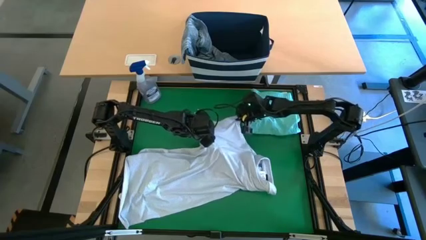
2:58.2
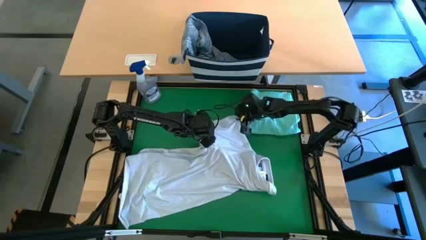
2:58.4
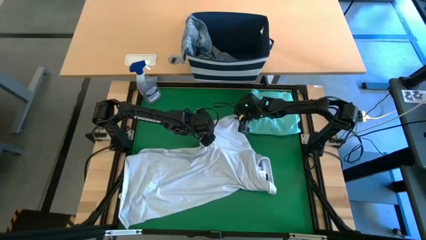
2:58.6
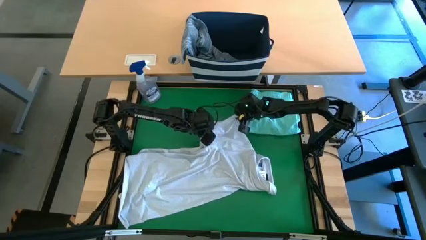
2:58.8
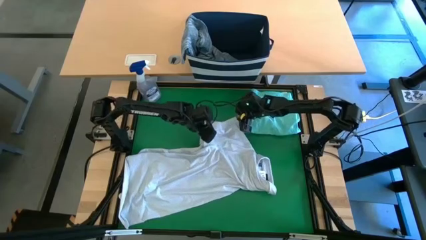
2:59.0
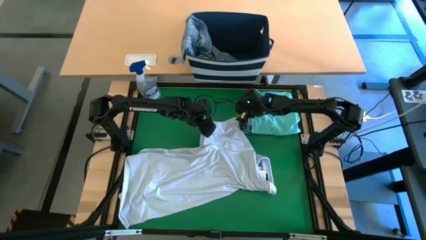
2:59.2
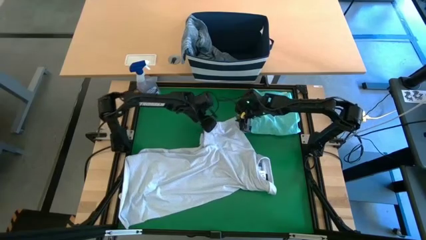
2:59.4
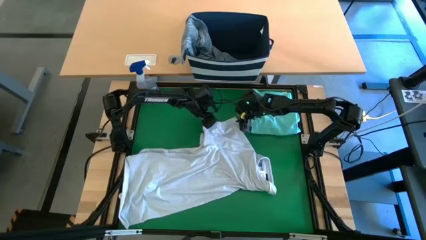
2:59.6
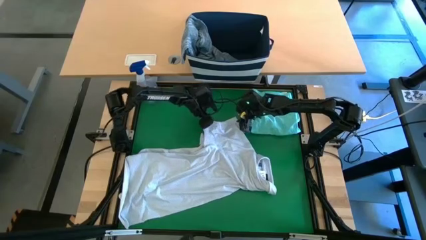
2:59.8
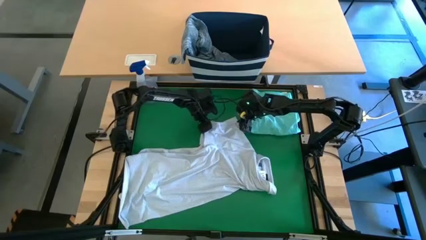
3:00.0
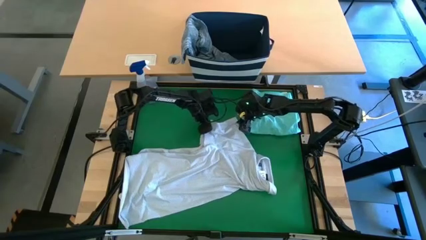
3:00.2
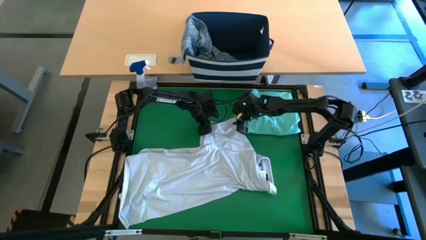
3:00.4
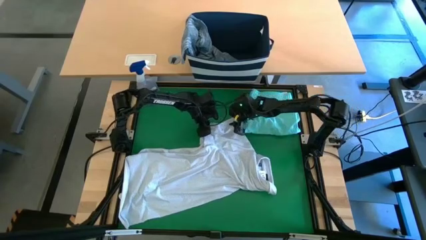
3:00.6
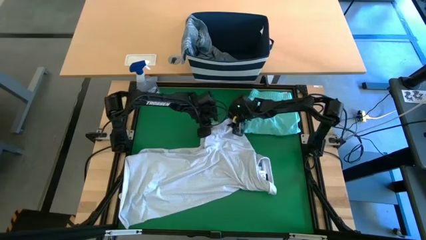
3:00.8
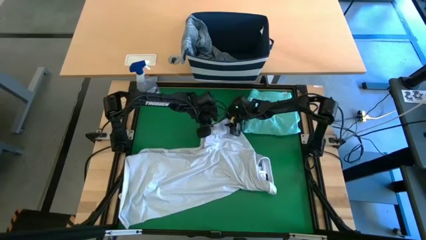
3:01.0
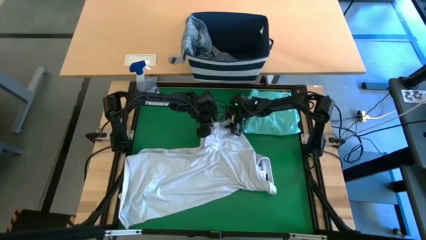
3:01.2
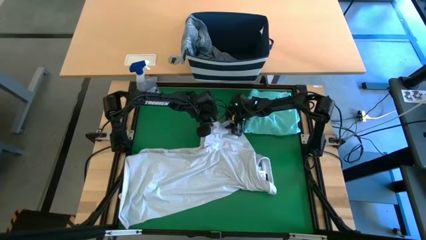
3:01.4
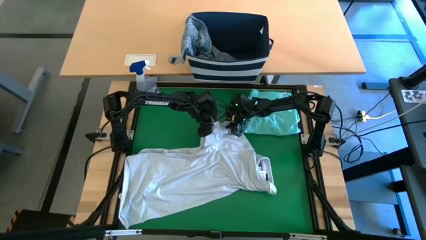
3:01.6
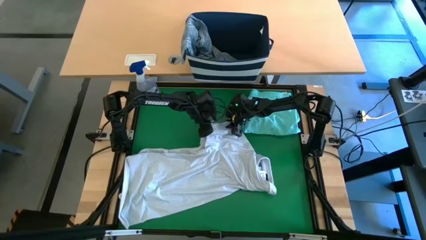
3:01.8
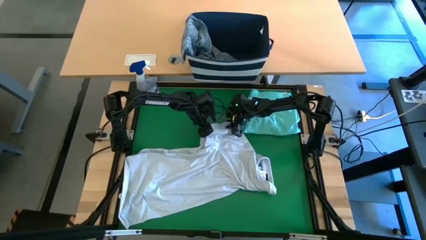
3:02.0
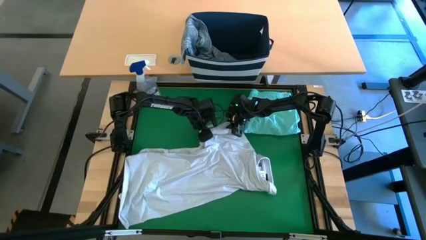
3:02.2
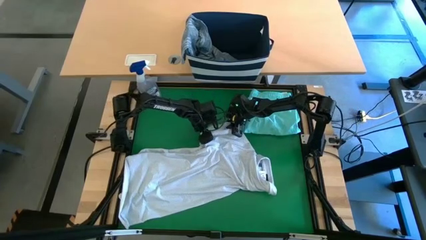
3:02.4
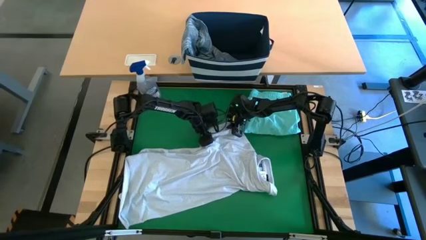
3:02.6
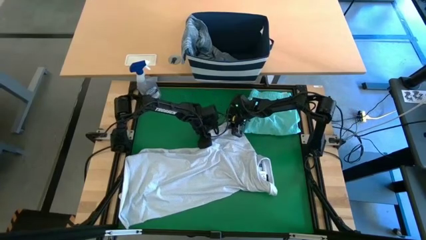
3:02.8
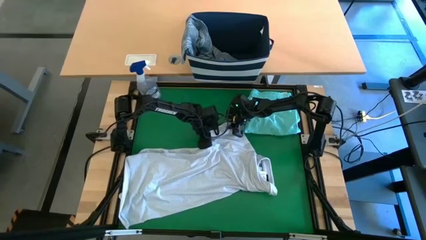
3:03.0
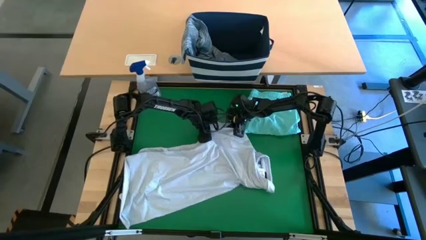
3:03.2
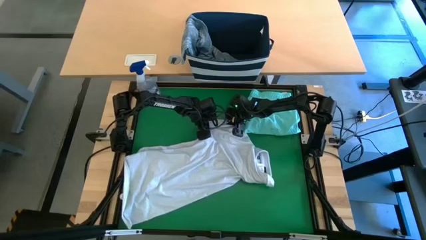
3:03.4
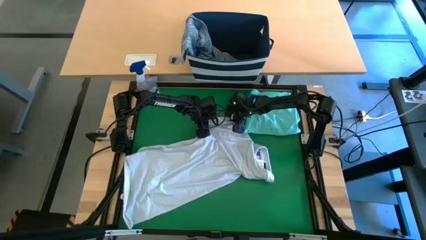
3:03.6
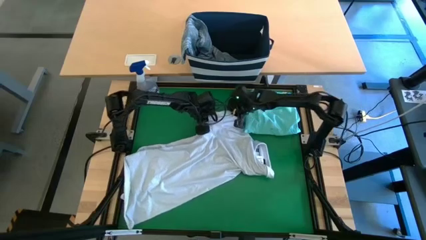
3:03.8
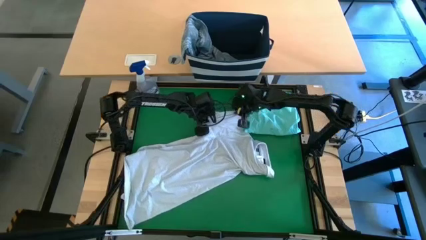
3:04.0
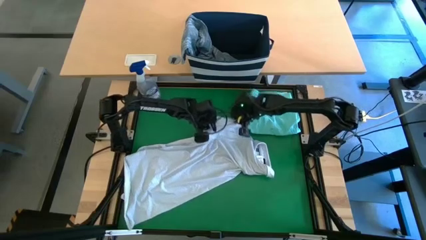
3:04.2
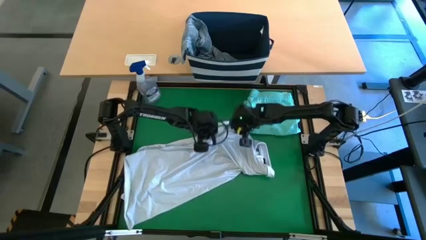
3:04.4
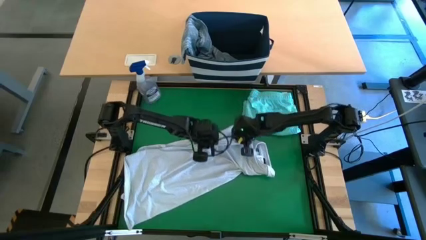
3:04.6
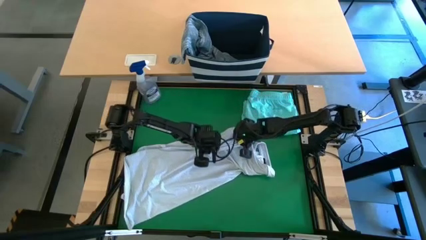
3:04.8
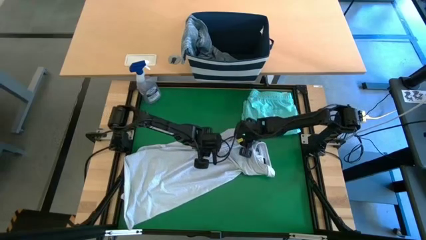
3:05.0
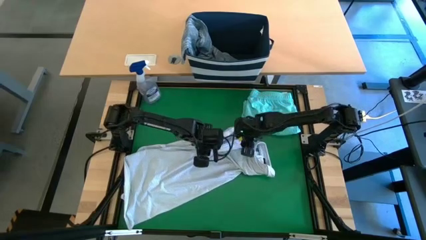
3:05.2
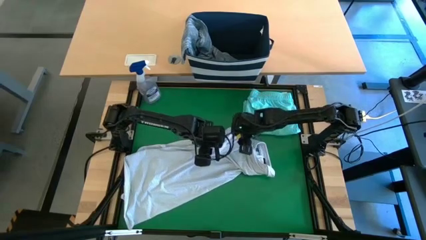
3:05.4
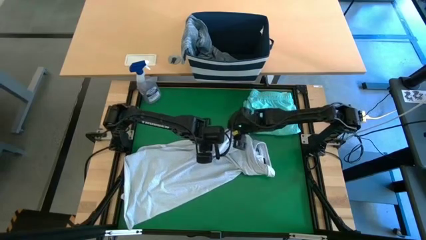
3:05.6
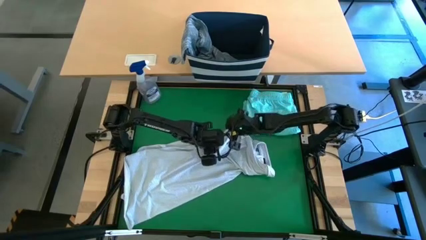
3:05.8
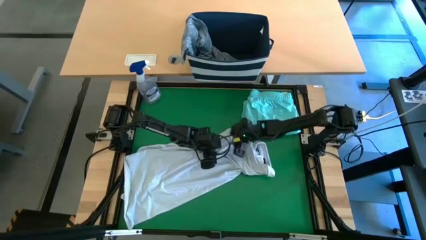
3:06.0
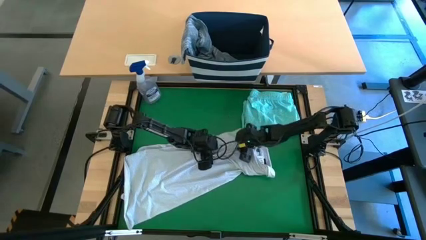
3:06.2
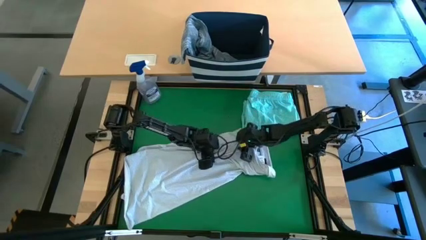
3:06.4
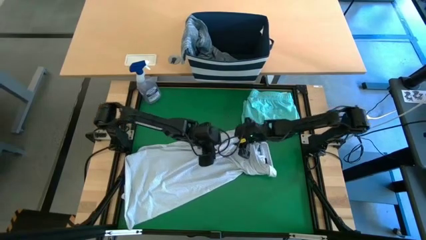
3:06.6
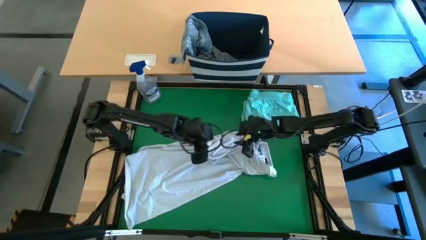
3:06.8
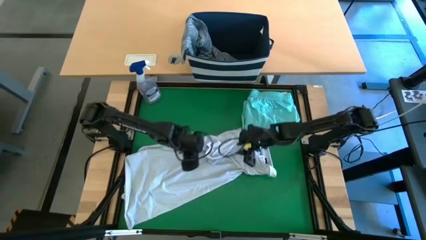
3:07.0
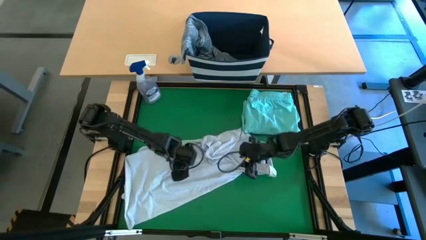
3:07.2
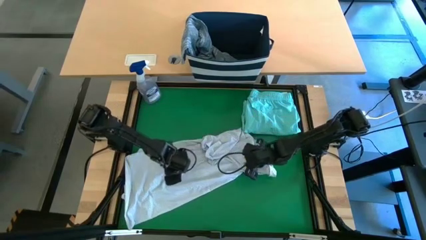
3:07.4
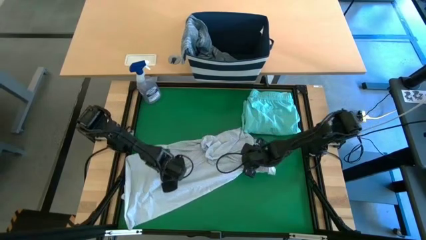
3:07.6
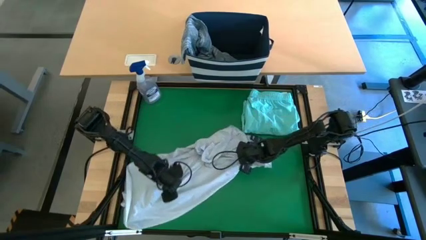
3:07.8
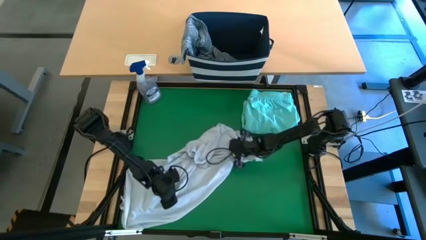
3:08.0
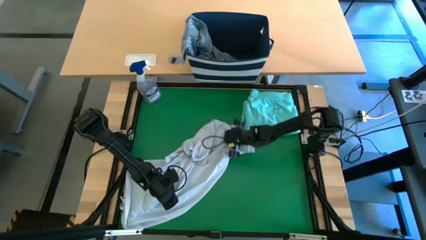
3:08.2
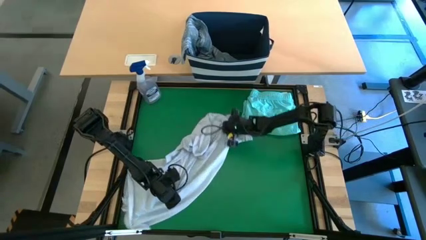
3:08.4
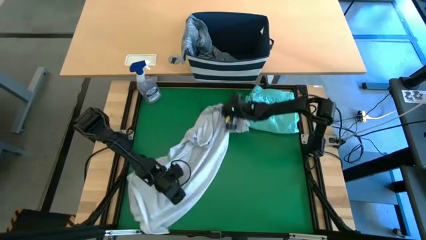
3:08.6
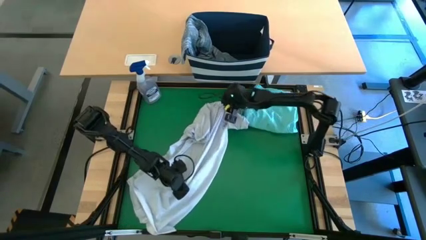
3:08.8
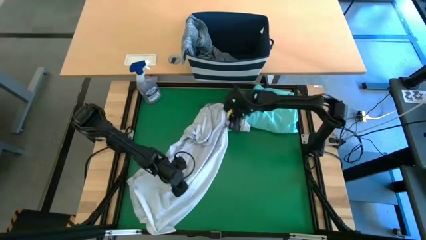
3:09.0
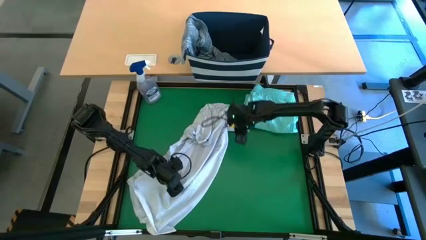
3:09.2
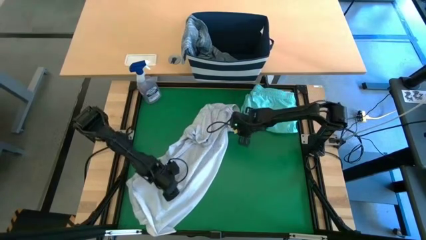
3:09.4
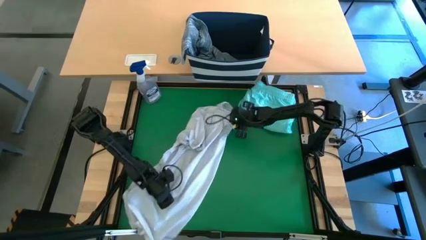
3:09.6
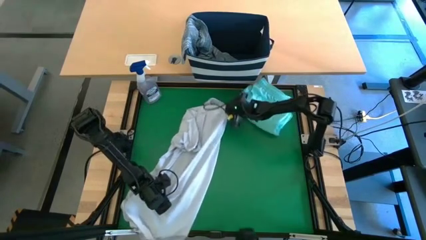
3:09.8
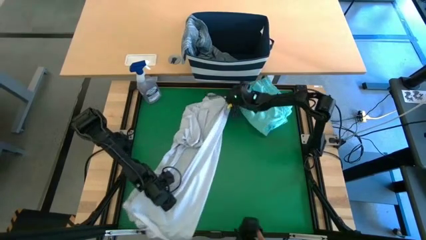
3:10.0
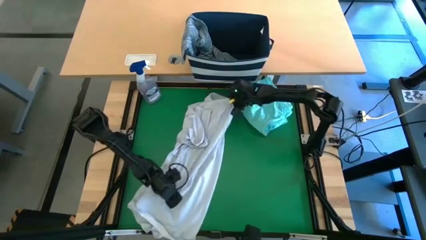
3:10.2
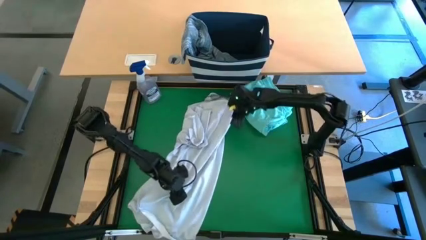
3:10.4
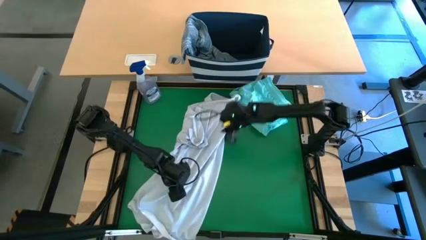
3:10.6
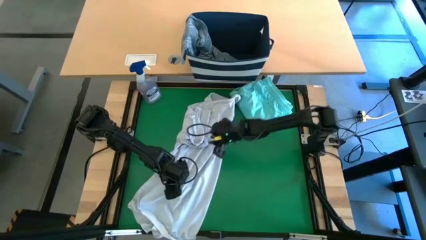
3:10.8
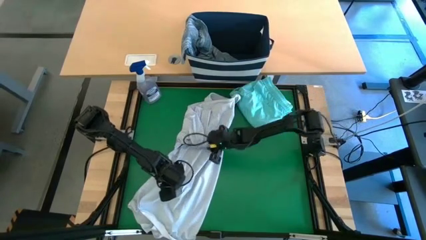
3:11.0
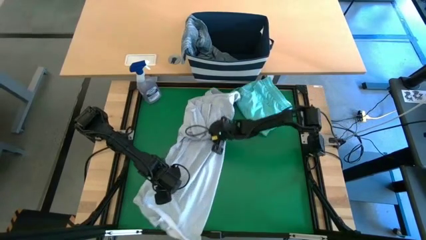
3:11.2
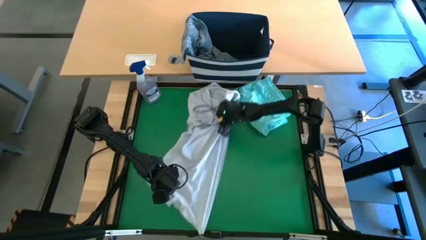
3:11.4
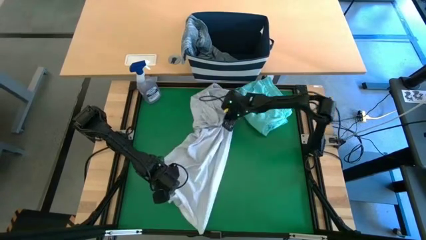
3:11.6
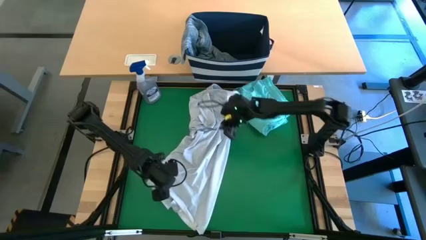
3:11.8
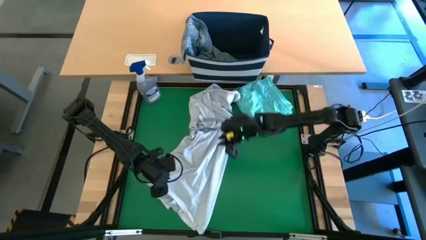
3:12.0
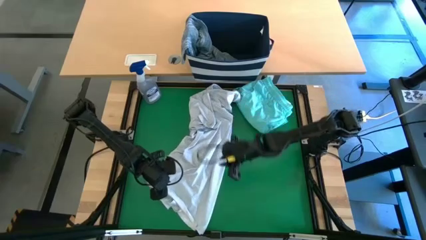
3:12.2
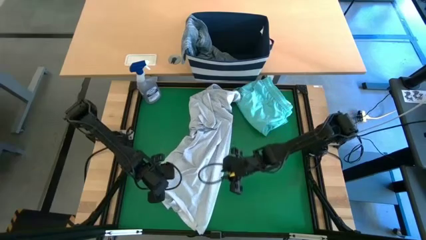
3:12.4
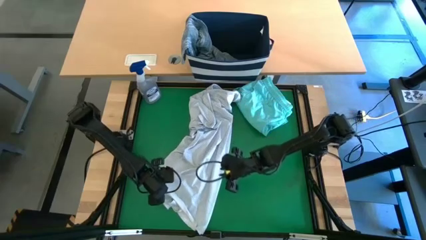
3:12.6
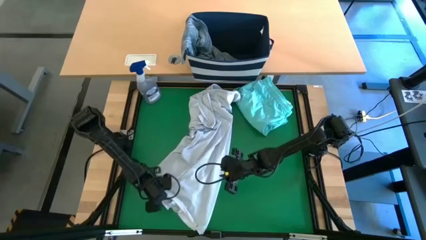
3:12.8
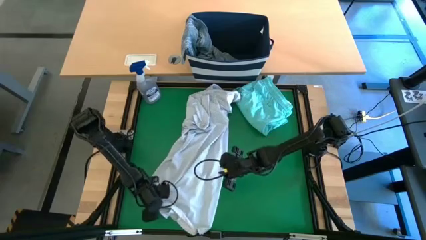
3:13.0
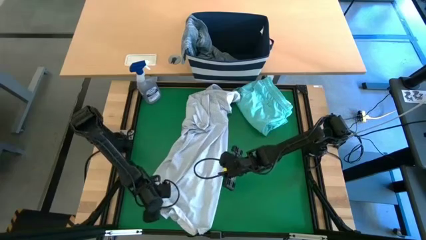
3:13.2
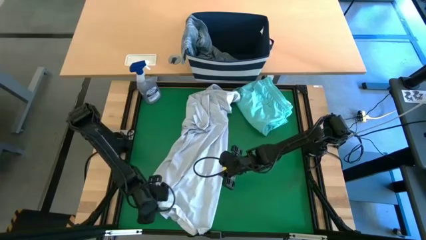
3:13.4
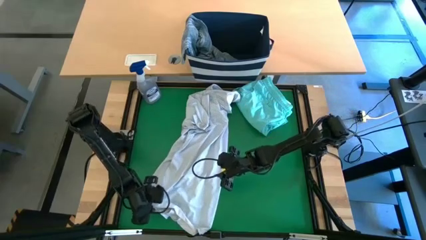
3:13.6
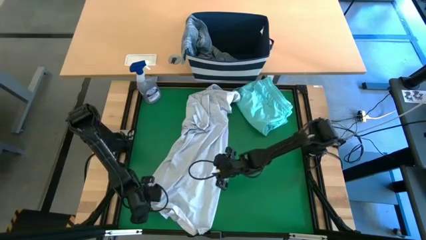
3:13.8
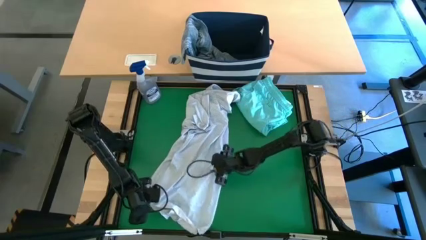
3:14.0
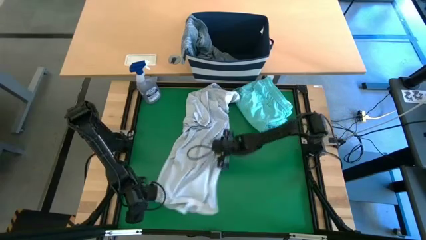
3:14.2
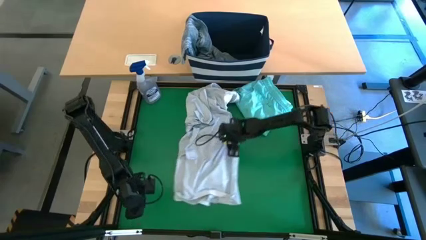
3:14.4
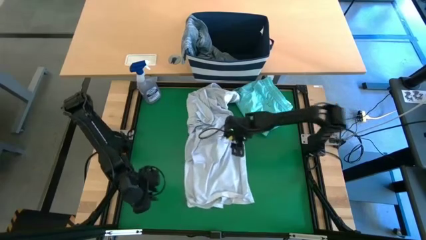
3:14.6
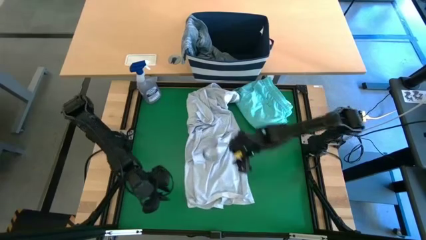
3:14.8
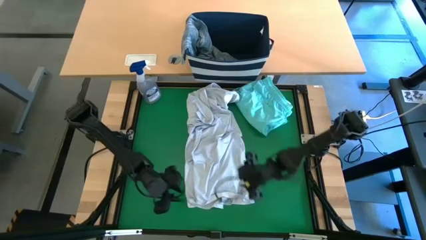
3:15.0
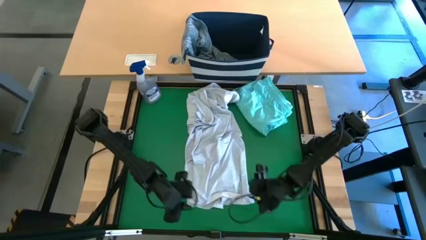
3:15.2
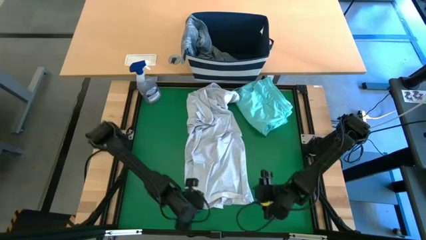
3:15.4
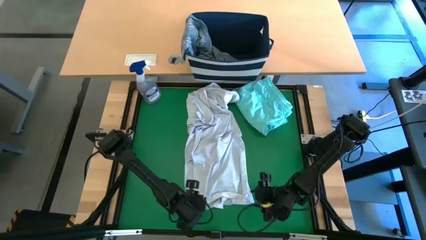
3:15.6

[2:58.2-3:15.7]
Task: Fold laundry
Fold the white polo shirt
